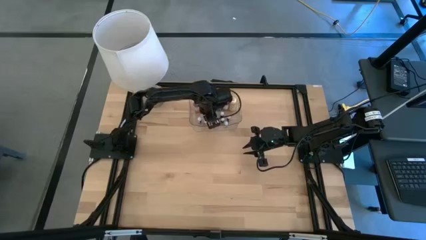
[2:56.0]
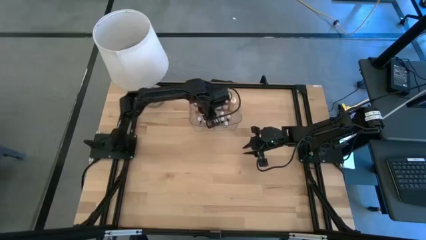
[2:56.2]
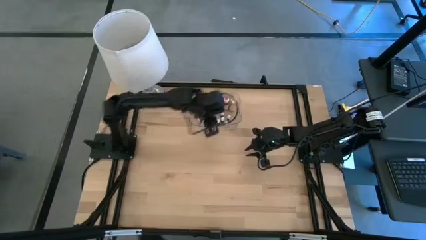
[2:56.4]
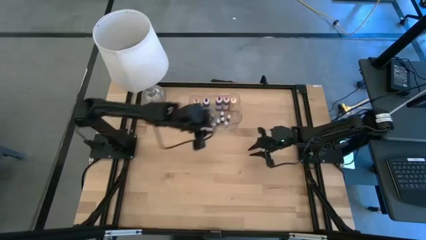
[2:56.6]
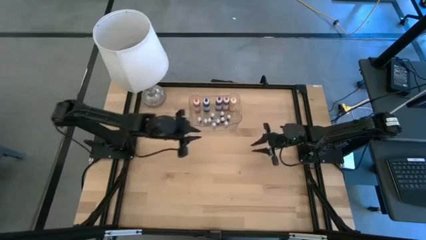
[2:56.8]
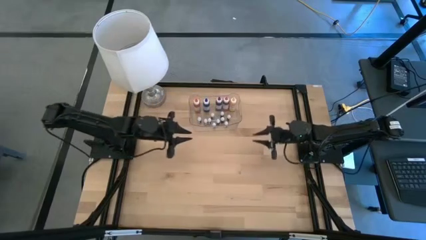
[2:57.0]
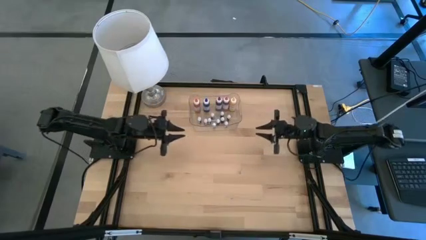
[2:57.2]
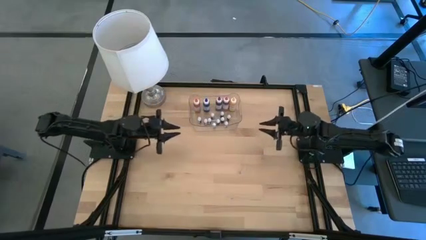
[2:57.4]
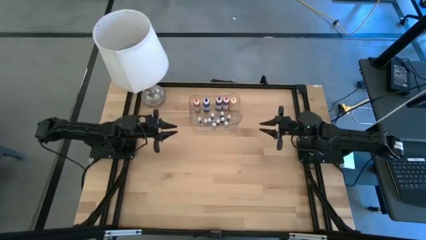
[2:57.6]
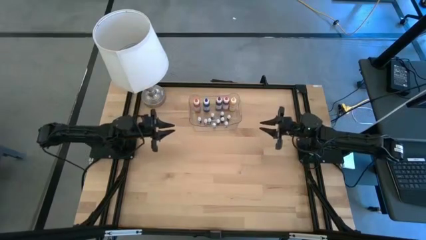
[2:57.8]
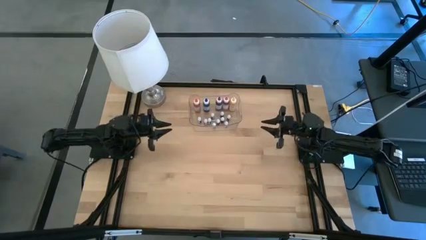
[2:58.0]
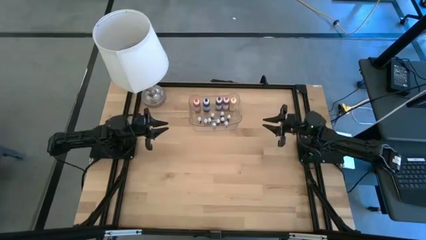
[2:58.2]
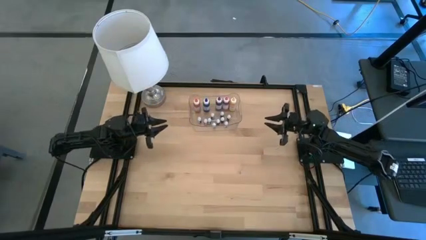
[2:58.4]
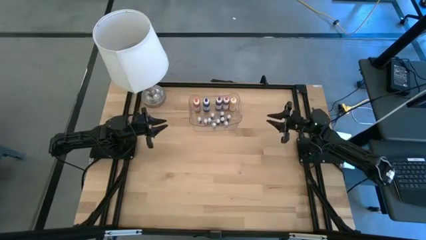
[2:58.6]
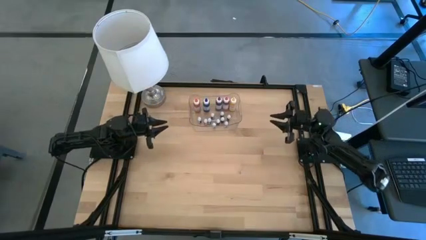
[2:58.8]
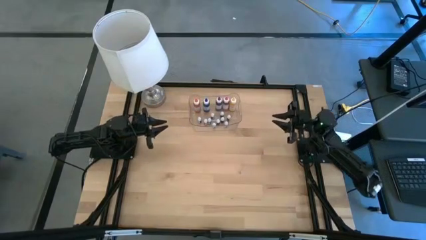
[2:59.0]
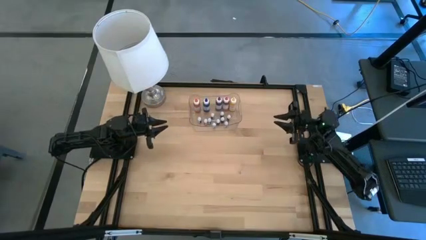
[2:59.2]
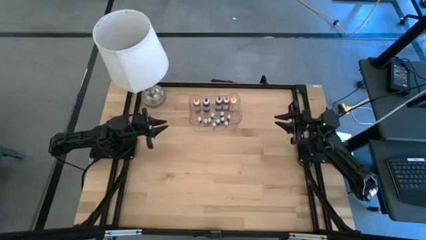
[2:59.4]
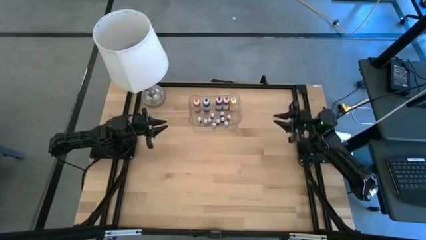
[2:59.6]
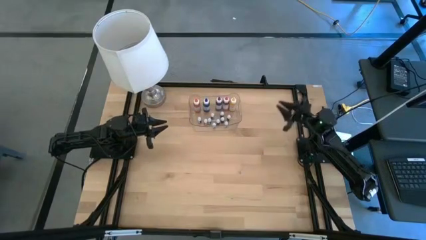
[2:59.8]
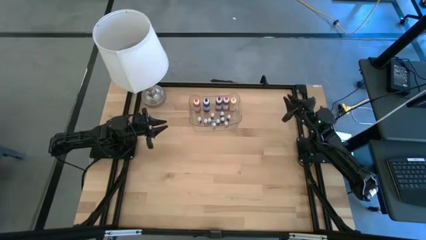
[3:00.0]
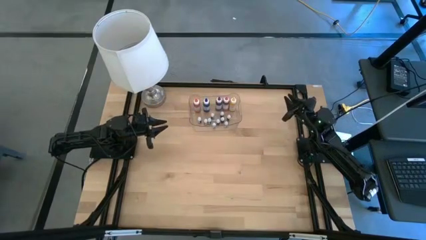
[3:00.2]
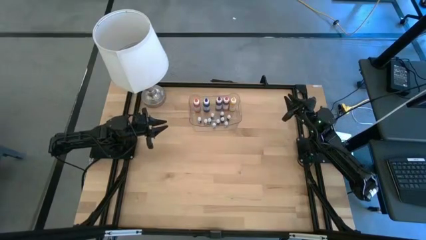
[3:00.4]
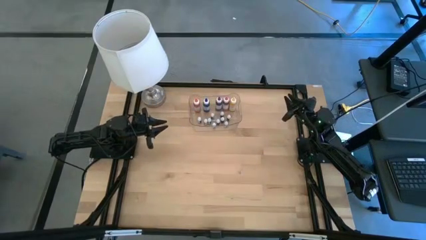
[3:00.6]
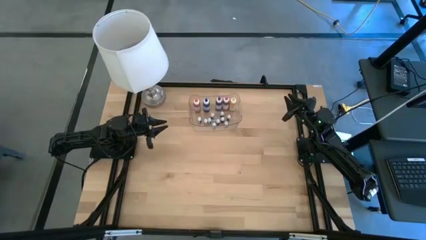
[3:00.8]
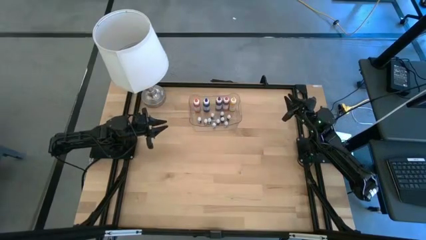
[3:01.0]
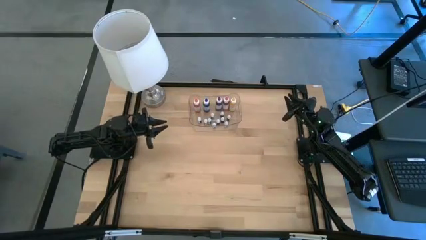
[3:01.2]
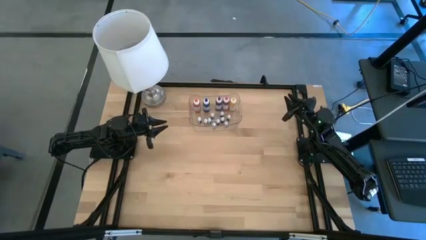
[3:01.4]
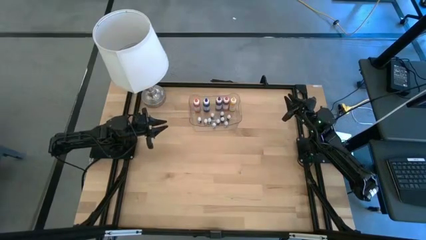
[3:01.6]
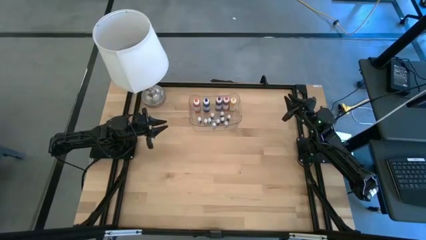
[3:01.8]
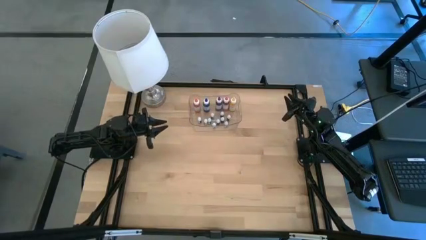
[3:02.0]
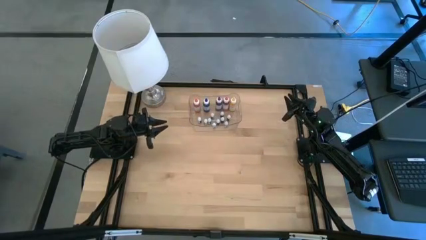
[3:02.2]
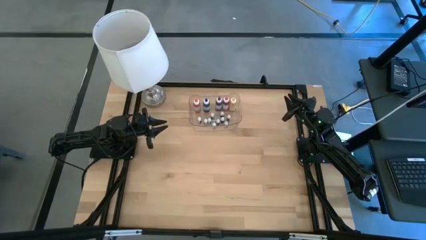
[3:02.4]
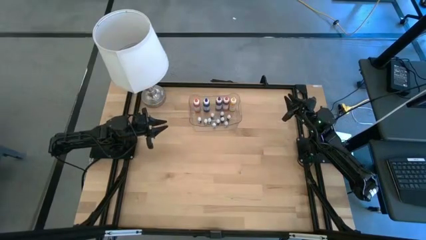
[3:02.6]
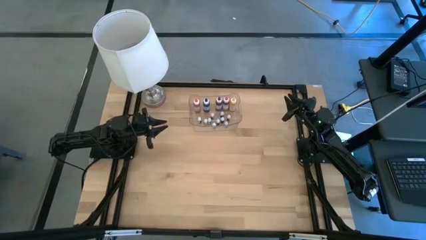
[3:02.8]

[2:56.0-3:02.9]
Task: Pick & Place food coloring
Return to Home Position

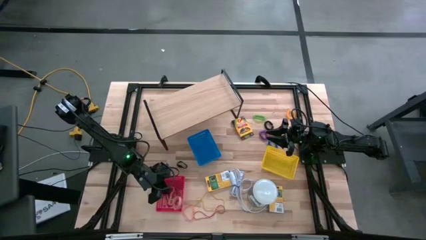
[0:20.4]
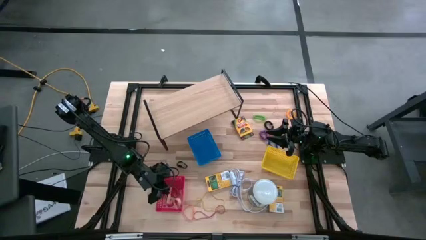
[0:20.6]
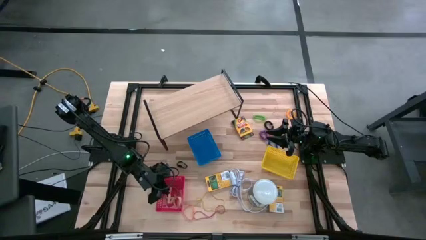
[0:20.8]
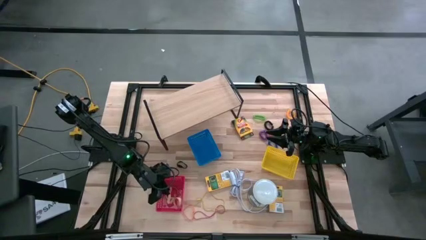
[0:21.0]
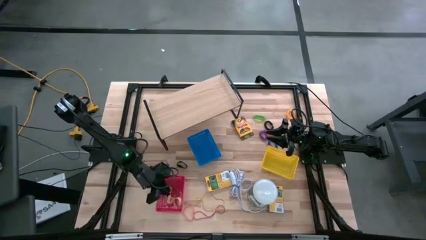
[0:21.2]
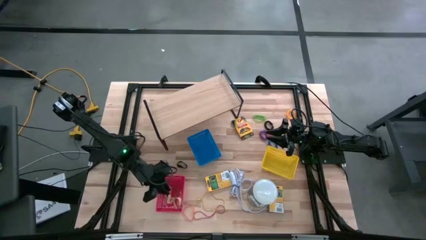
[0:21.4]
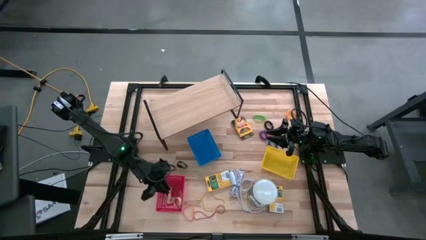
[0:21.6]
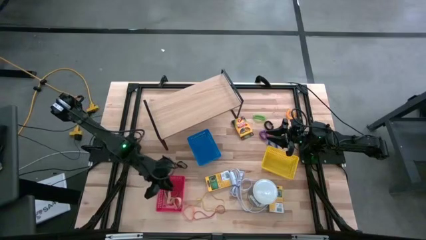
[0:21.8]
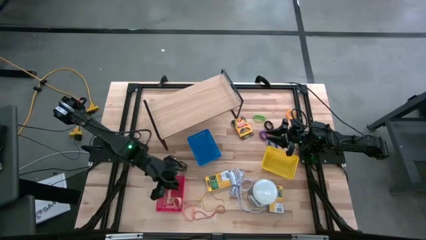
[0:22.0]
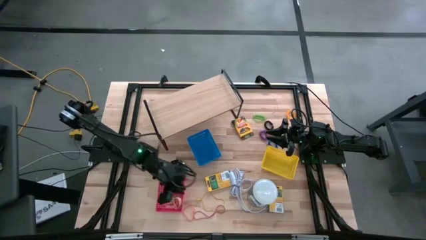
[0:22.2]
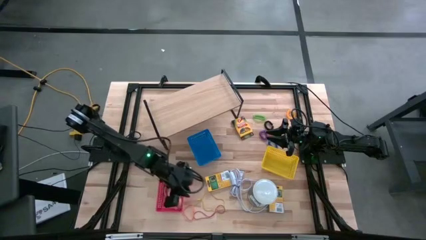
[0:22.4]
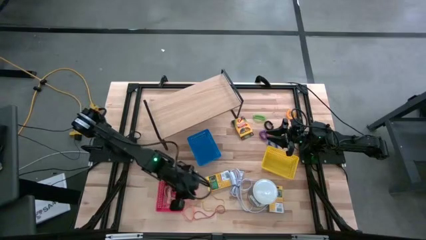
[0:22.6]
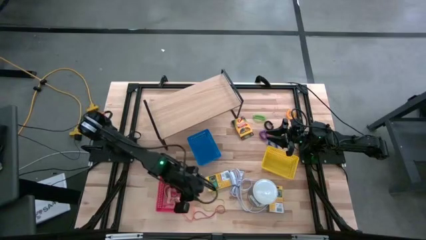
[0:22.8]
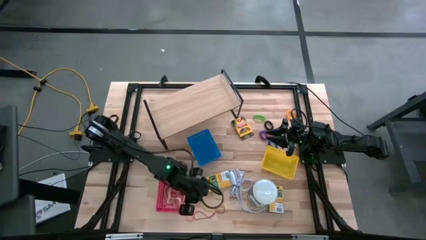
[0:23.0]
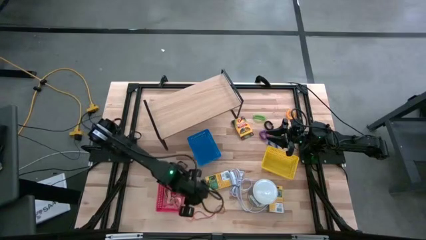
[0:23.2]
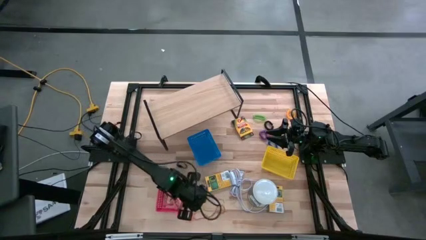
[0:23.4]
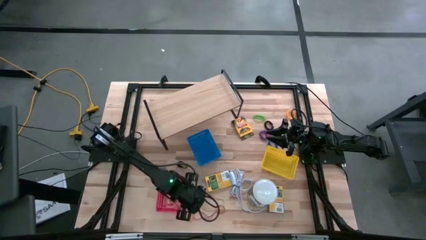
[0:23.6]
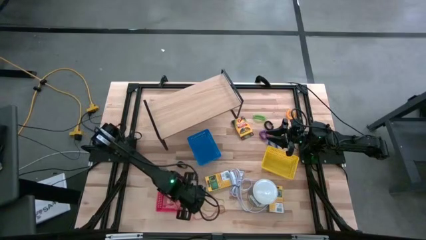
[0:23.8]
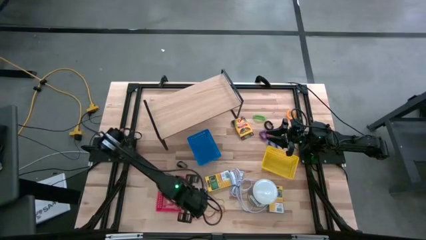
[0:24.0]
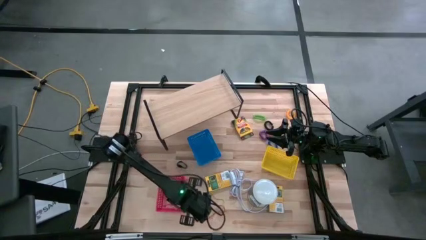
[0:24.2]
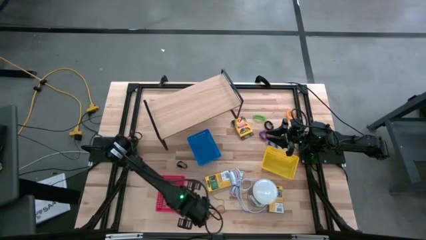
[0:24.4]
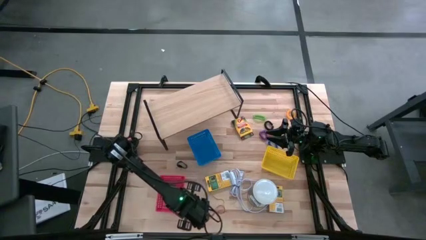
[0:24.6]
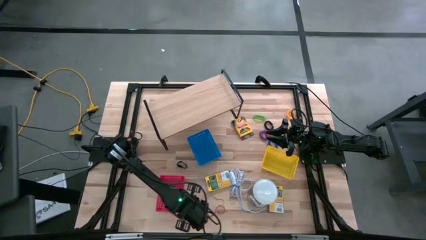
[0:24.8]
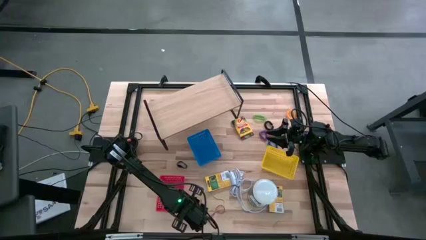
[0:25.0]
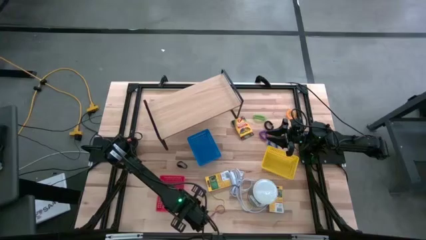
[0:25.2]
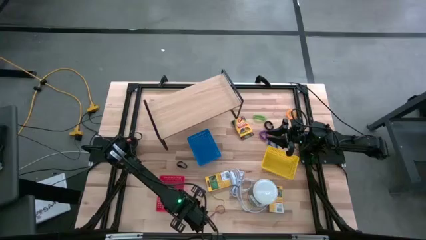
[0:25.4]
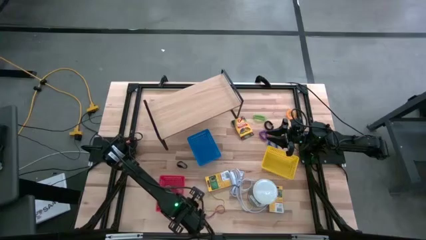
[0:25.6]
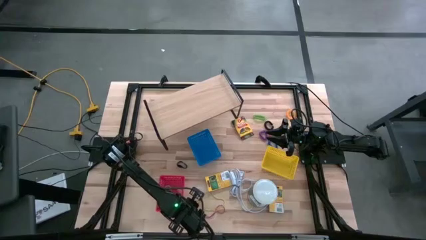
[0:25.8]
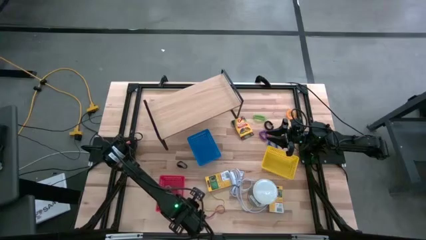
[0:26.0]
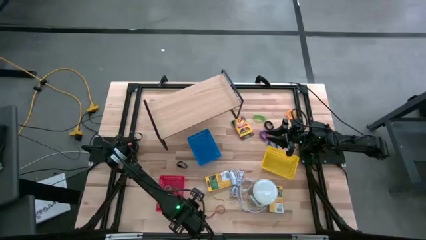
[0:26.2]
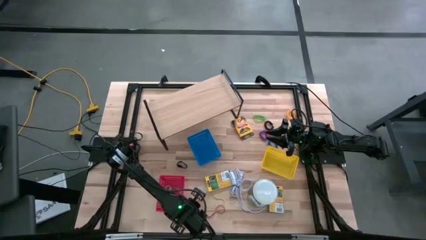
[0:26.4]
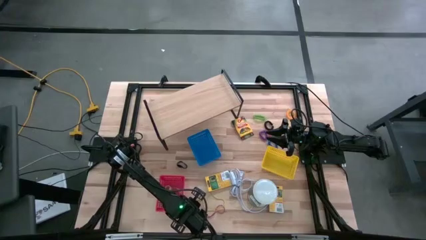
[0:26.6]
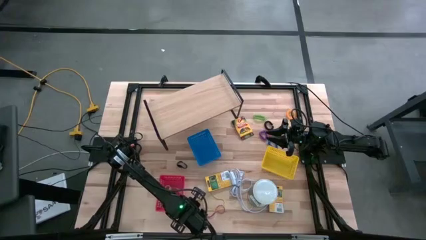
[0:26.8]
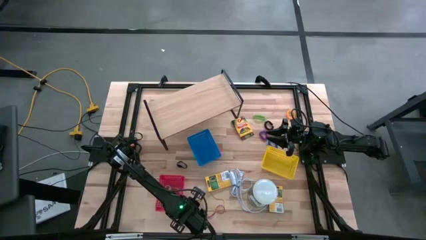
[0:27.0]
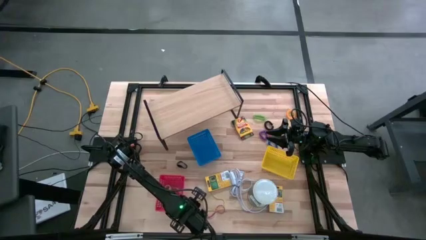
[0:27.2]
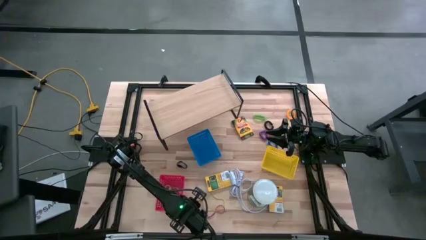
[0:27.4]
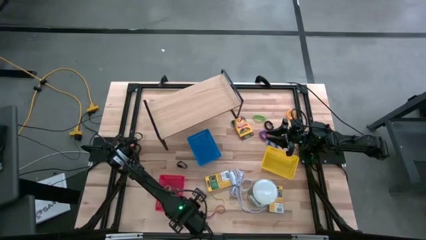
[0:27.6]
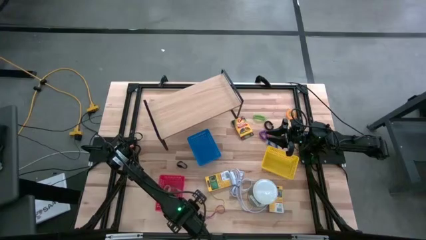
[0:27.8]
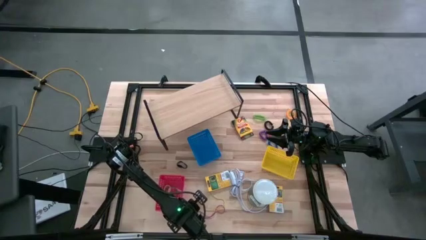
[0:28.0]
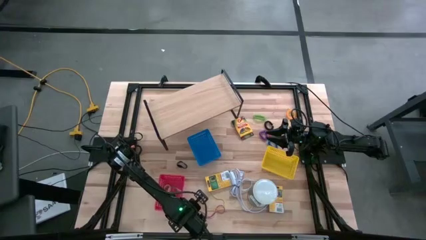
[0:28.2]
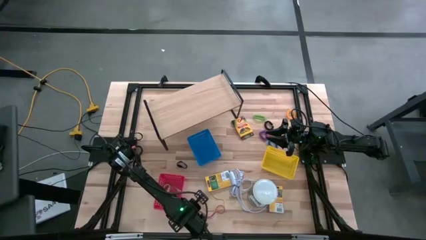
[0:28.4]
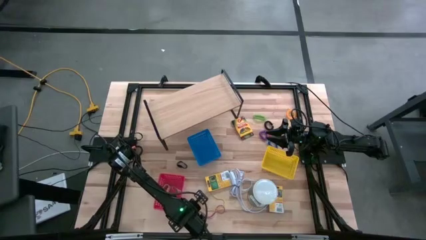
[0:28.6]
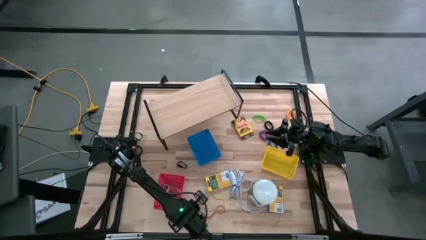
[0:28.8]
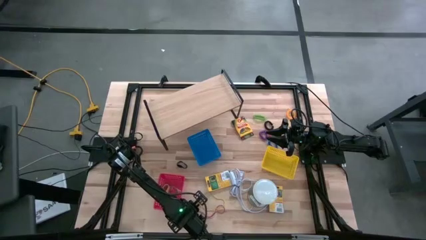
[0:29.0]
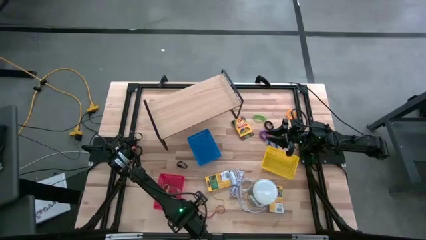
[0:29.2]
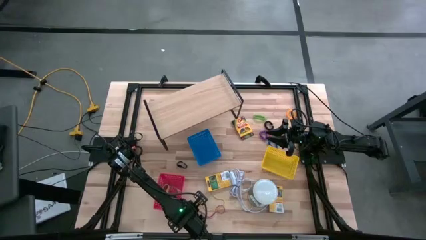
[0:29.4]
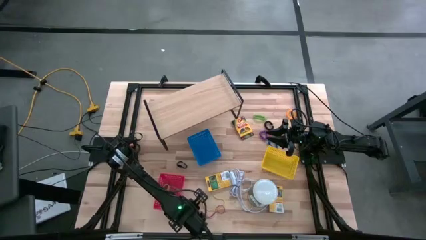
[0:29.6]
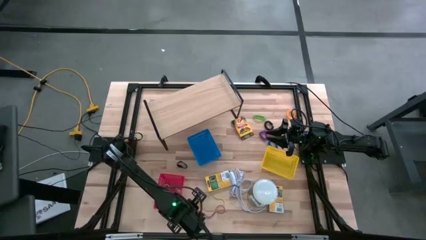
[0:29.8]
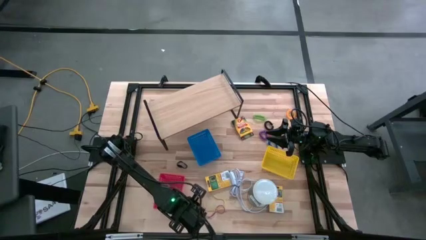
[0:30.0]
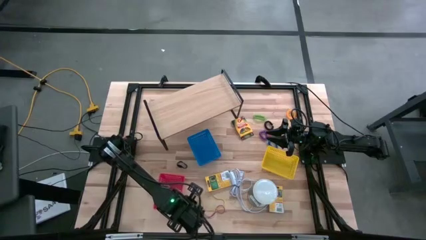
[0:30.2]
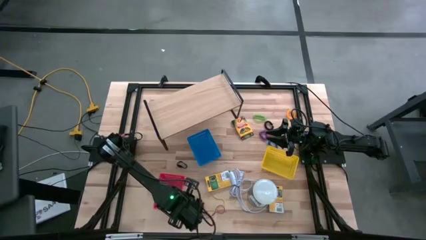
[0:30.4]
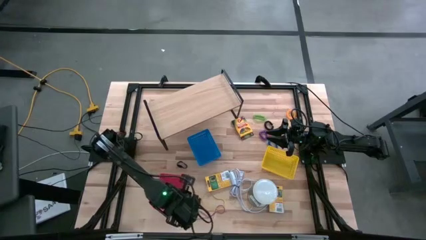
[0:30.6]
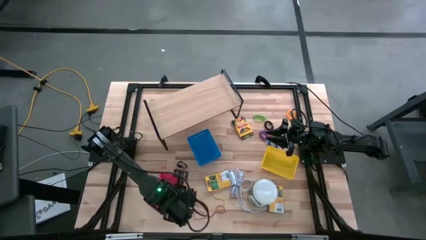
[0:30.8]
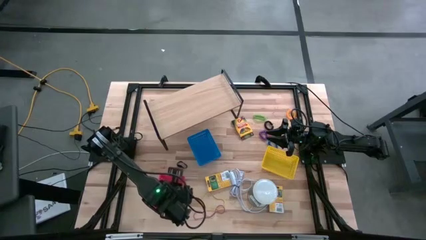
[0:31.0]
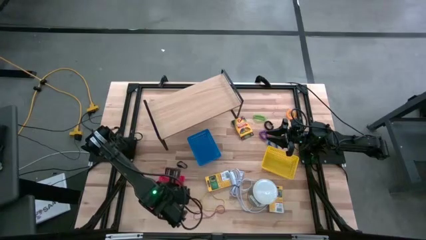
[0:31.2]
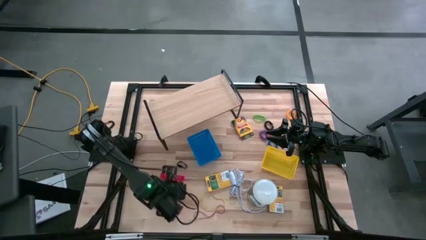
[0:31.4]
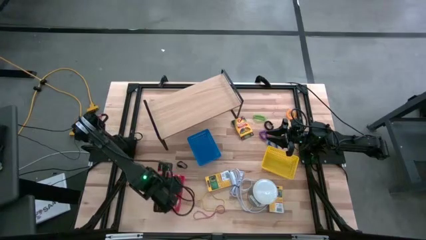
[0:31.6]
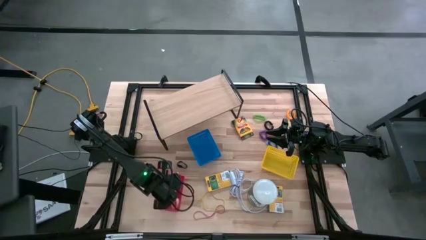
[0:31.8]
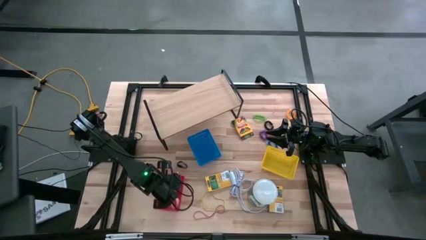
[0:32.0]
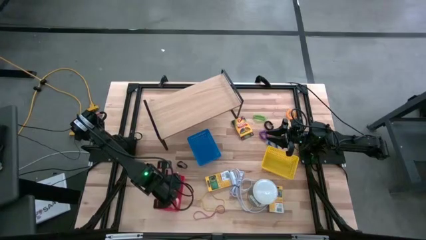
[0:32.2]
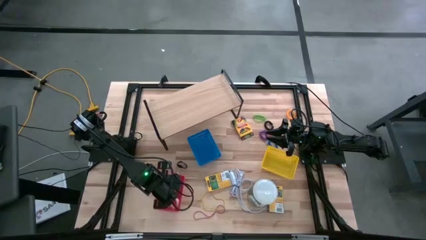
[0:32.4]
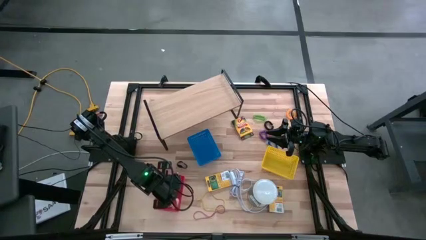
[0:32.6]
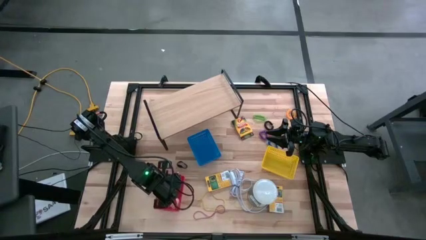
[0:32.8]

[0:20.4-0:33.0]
Task: Pick & Place Office Desk Supplies
Put the orange rubber band into the red bin
